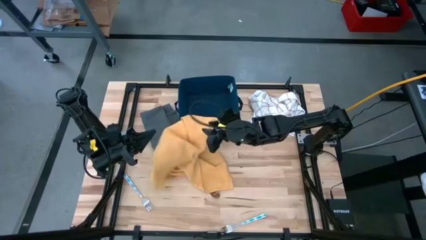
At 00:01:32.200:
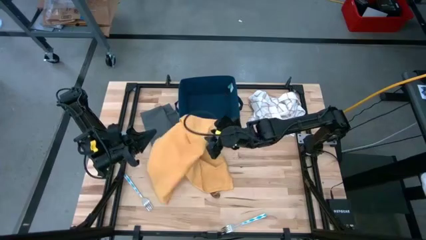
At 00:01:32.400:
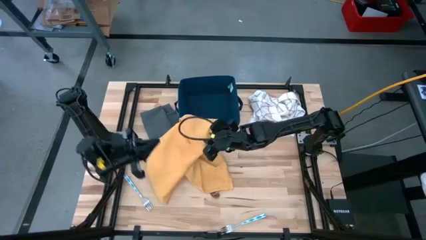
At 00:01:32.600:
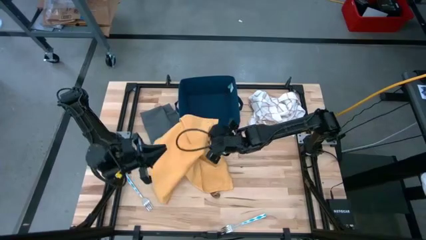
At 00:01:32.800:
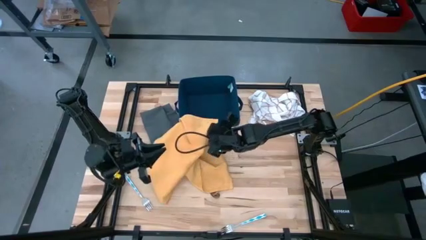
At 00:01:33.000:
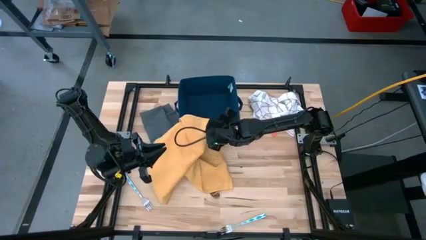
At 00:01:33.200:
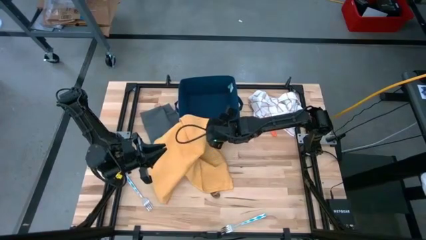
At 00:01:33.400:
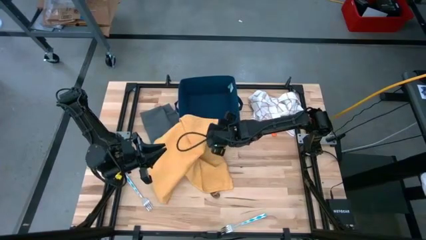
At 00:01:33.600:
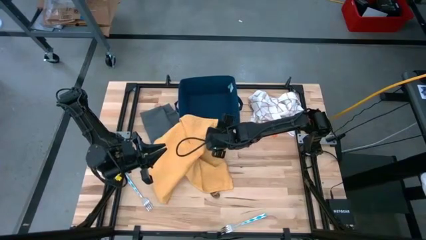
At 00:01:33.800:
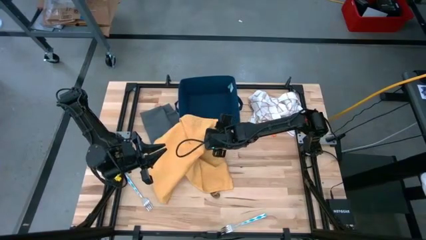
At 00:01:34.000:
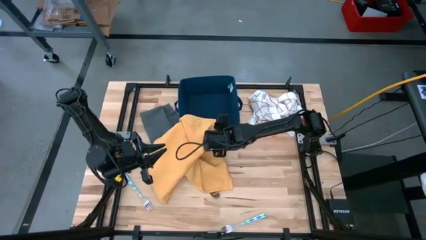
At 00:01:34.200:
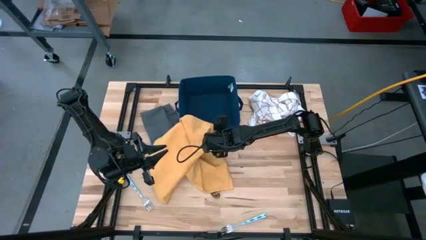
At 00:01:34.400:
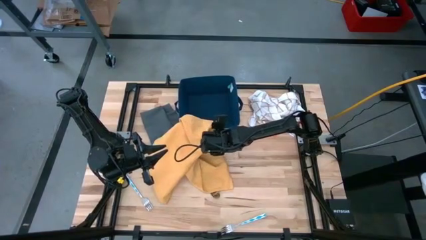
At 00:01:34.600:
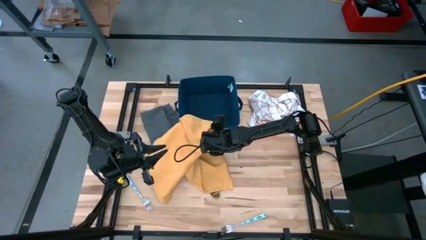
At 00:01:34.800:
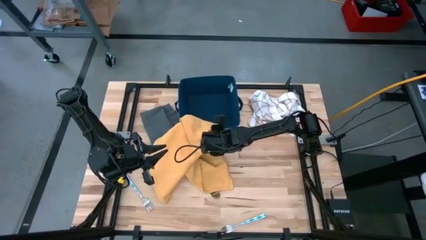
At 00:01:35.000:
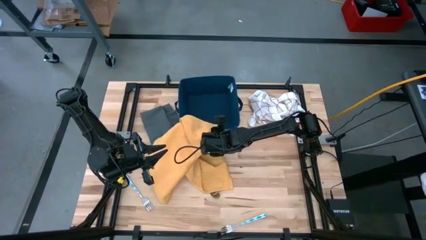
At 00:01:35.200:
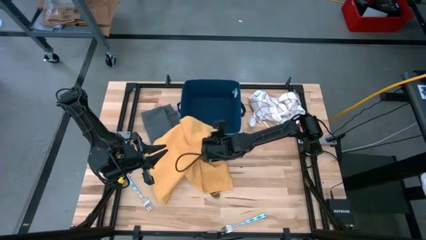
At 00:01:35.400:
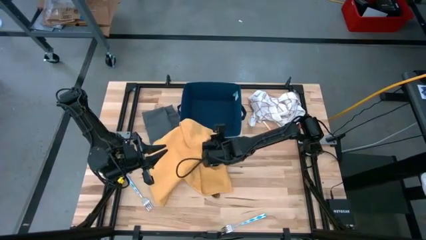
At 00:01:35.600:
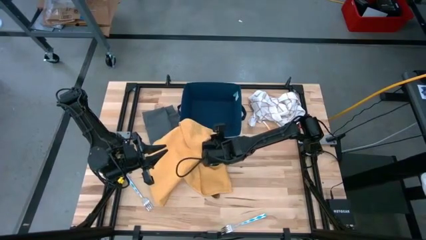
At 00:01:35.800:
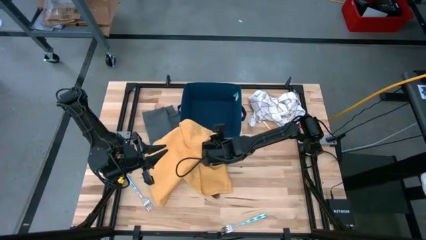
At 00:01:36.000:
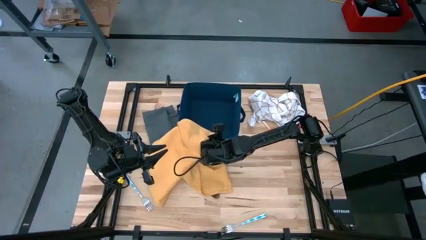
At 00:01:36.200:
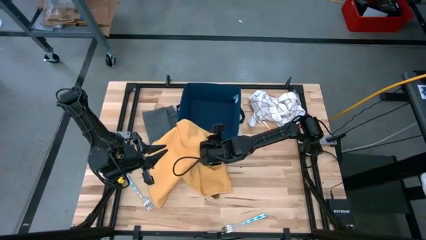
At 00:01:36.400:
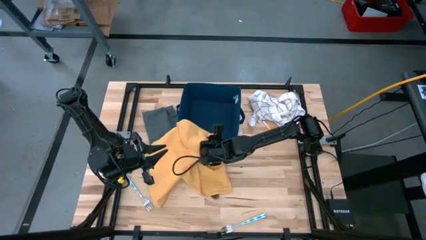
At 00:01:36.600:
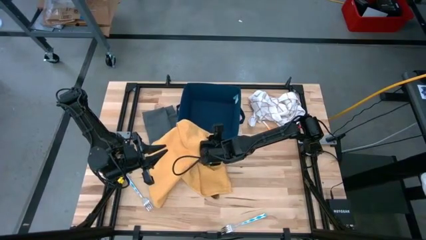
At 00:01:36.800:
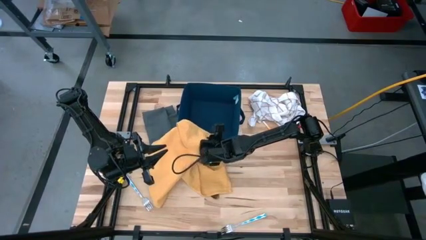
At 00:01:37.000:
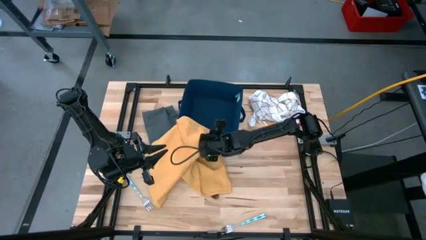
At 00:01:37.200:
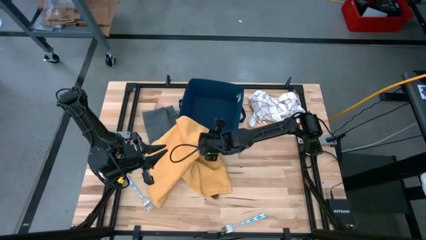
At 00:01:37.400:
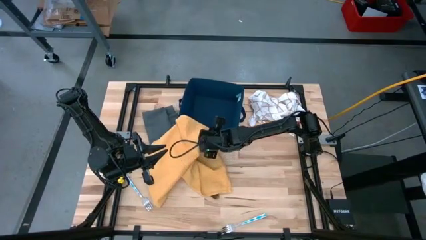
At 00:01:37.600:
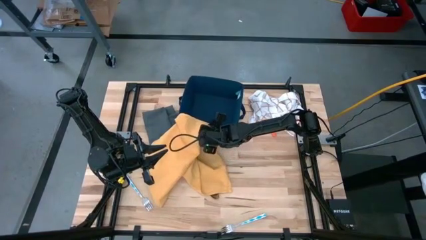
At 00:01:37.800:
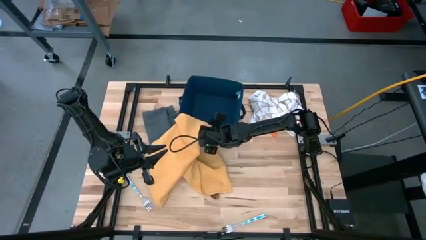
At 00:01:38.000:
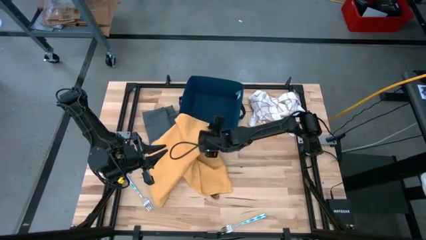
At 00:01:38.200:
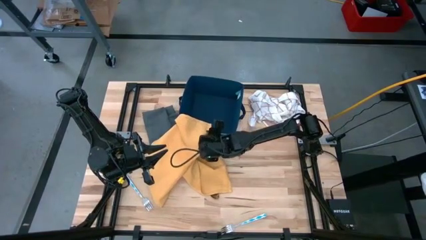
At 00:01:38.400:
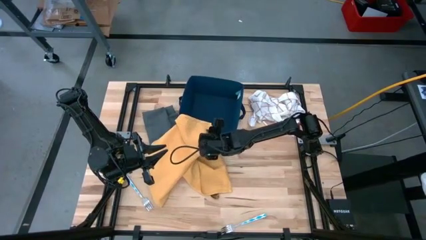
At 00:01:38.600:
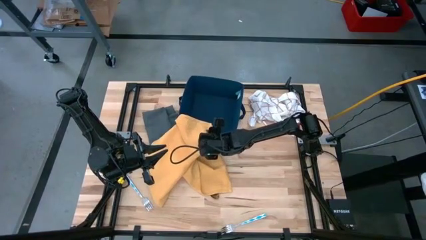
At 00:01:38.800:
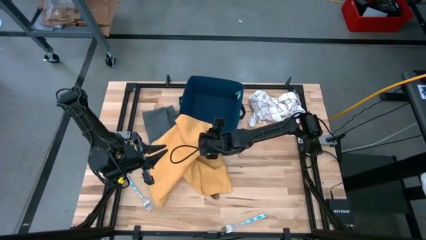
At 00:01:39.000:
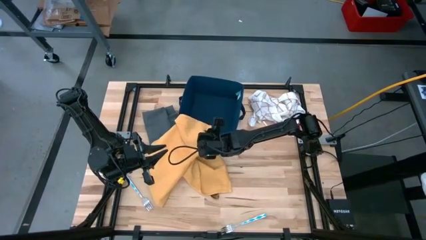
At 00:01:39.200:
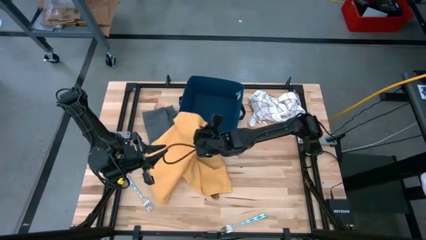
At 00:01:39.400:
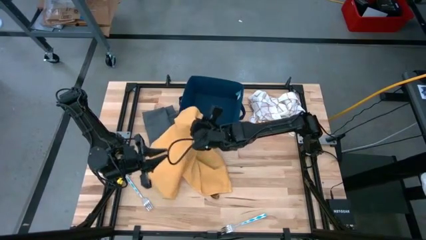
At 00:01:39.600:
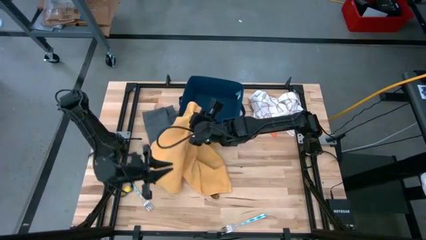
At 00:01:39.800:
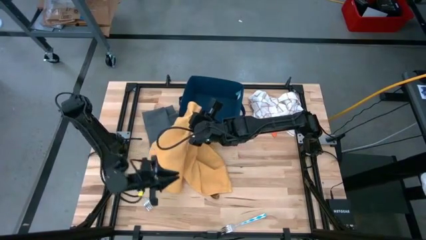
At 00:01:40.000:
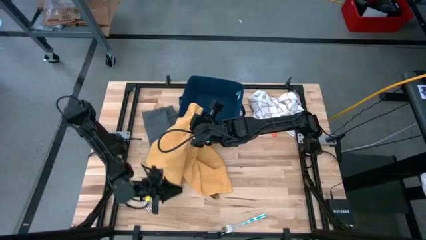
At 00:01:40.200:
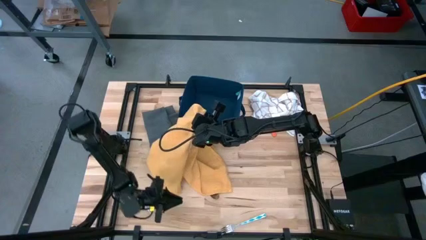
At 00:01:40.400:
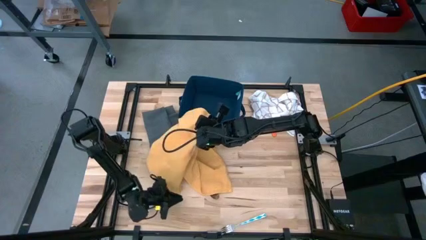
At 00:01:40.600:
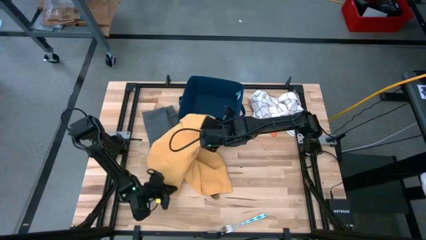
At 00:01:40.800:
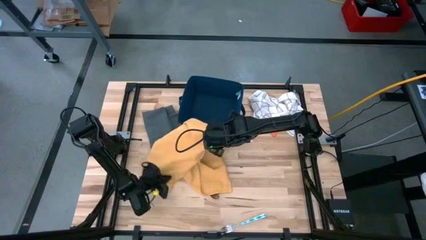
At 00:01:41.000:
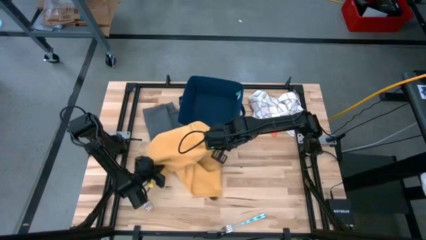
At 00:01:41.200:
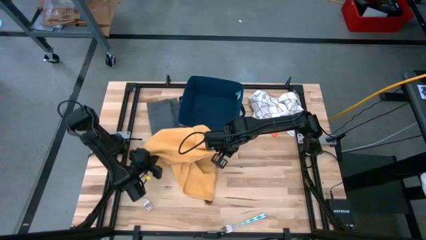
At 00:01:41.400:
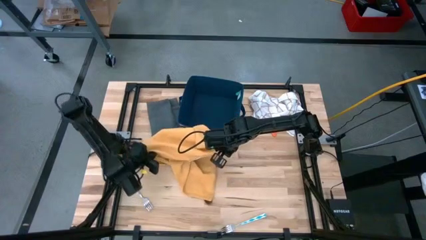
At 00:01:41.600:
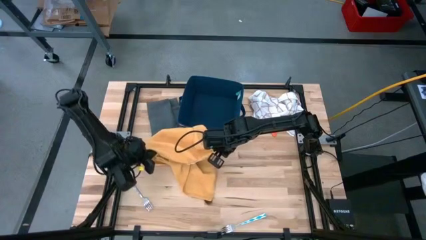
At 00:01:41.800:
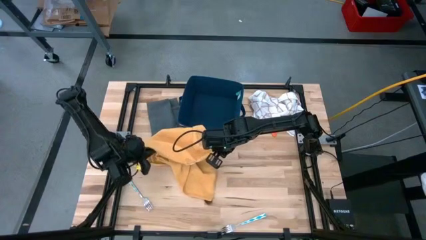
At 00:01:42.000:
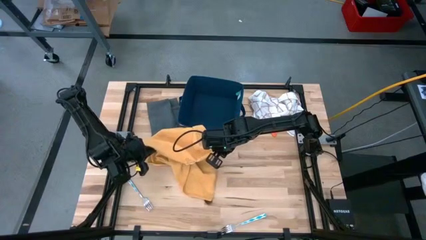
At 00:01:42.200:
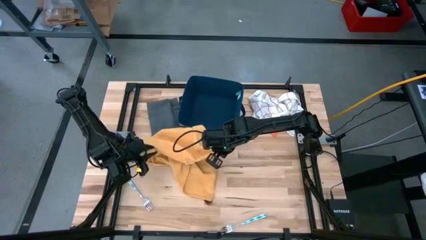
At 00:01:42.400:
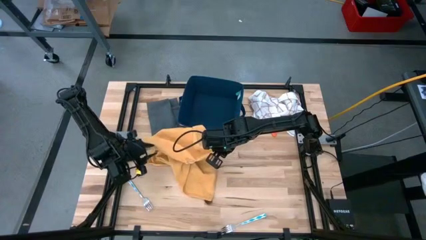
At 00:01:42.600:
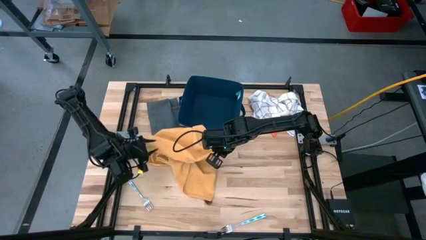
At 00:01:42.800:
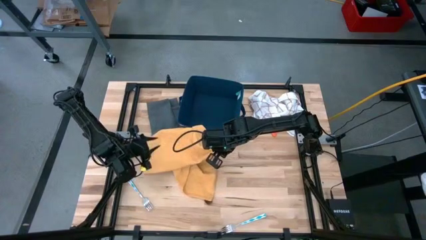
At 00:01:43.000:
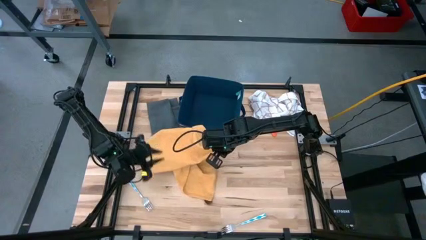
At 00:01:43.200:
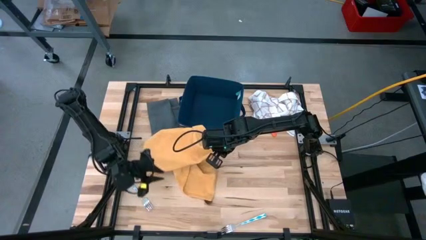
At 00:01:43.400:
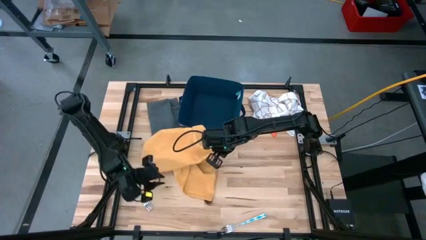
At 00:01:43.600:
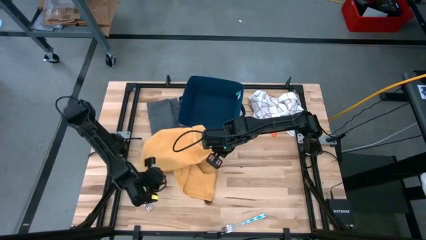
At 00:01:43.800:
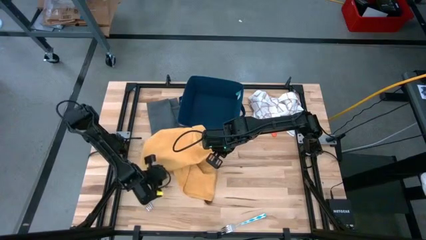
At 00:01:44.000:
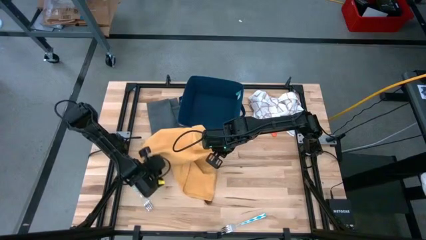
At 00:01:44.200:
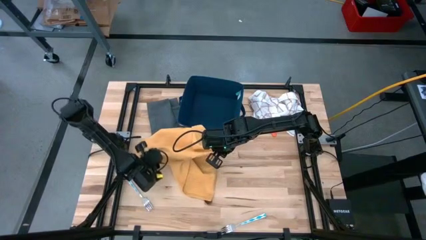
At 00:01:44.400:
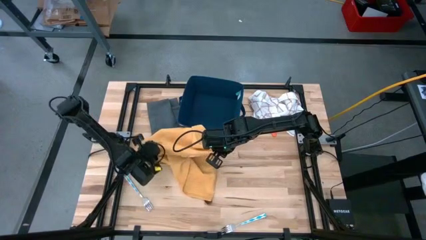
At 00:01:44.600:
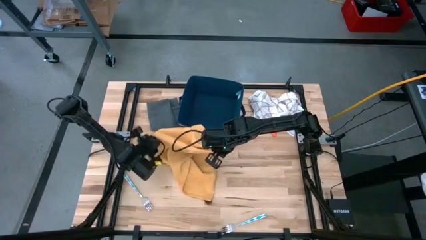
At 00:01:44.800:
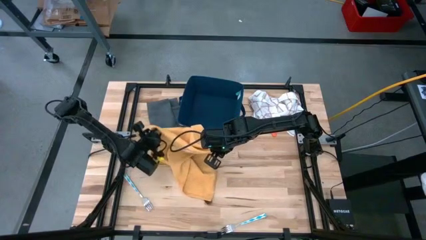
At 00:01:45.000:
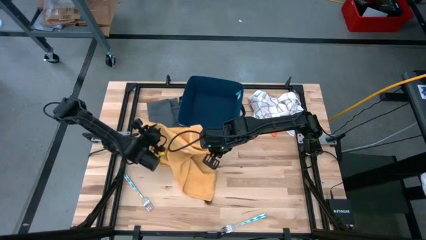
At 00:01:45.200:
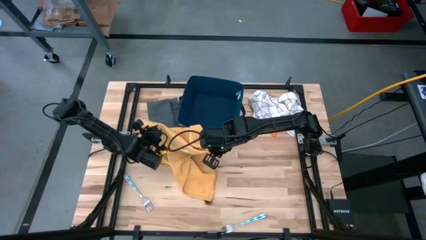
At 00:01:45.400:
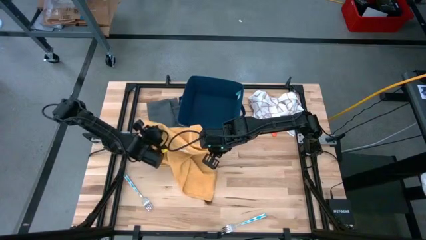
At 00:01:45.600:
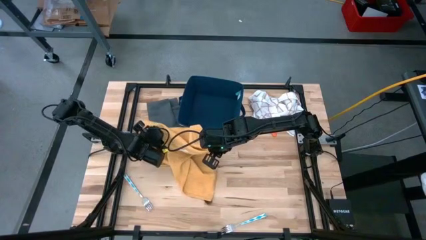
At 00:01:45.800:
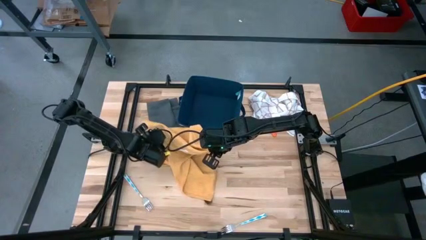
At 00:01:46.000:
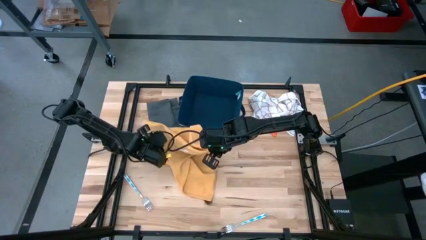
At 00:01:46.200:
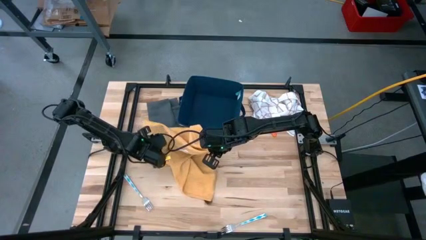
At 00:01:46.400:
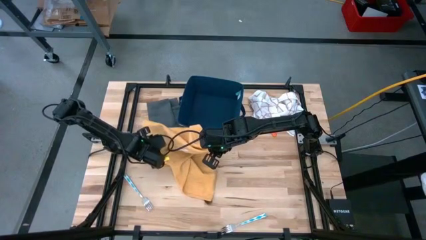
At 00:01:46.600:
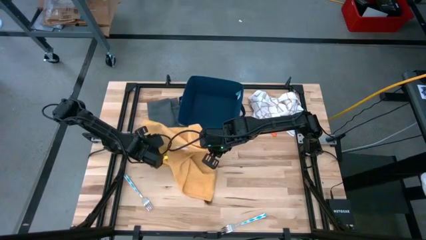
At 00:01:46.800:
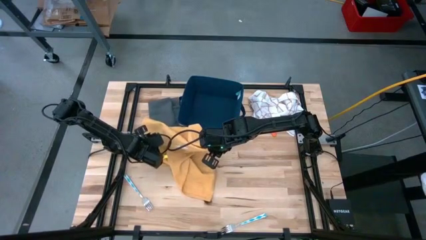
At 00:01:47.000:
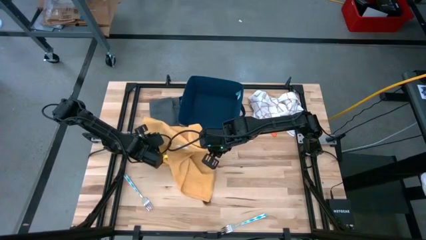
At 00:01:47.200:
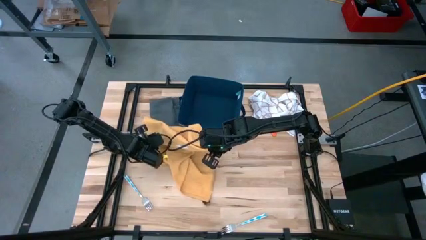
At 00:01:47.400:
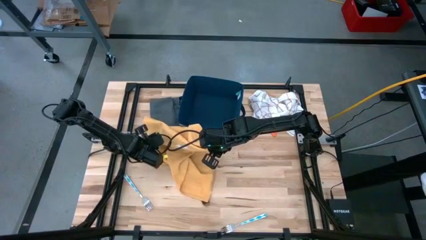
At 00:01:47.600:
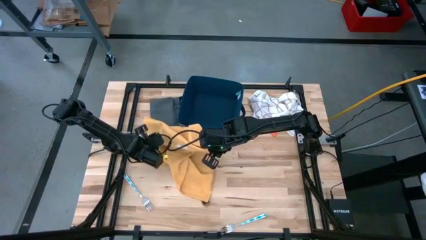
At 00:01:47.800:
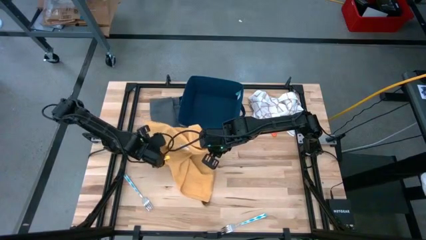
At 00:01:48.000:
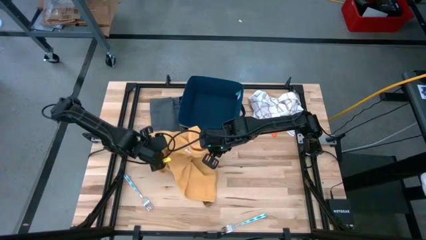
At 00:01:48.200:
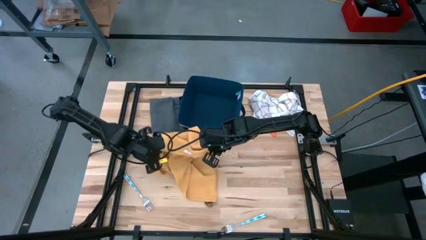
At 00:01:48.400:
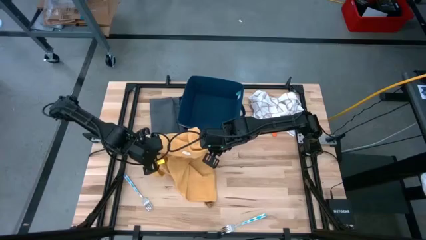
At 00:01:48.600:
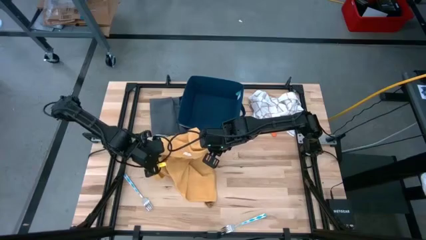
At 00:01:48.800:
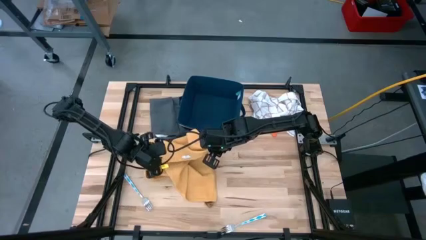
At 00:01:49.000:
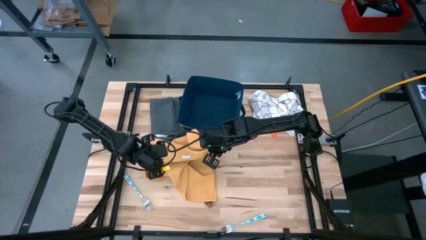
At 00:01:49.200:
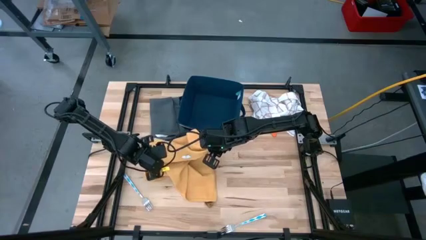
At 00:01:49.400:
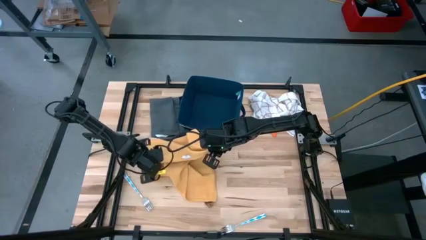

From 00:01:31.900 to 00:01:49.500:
Task: Fold towel
Fold the yellow towel
